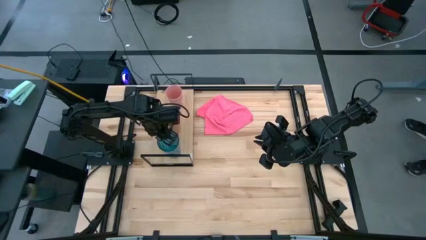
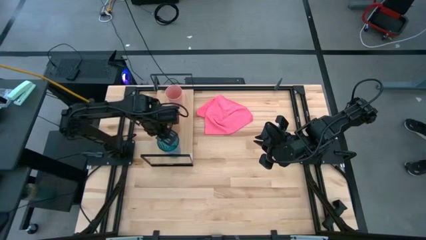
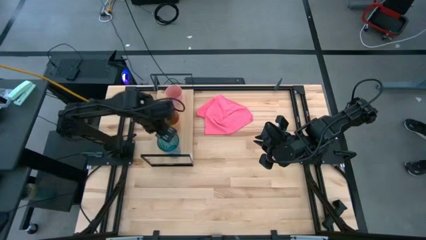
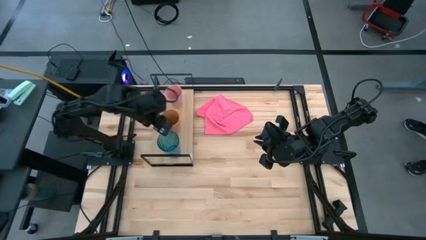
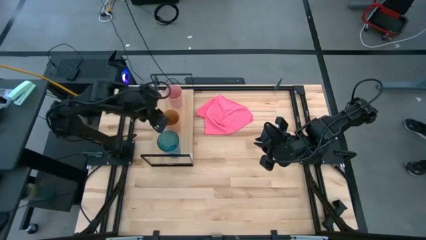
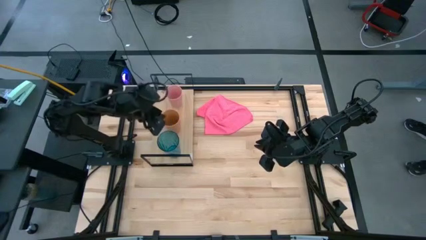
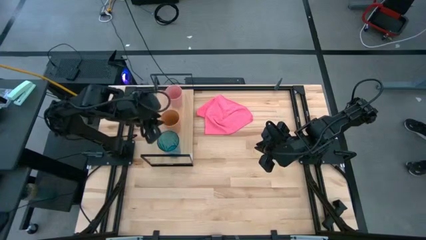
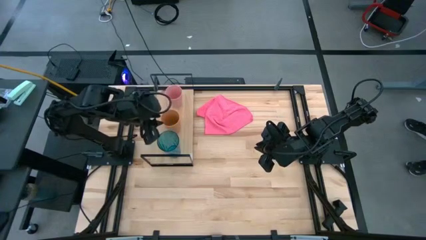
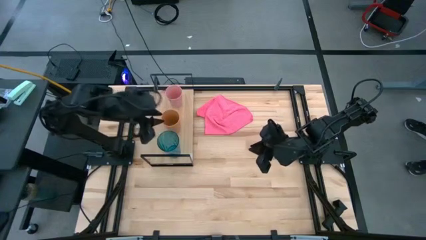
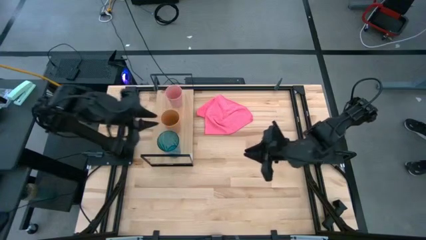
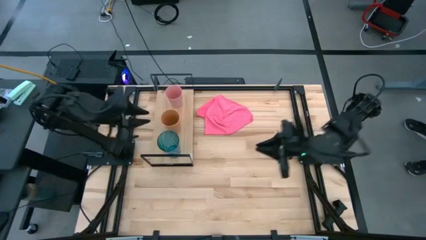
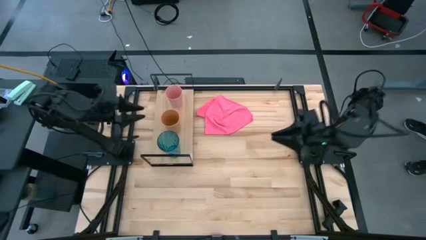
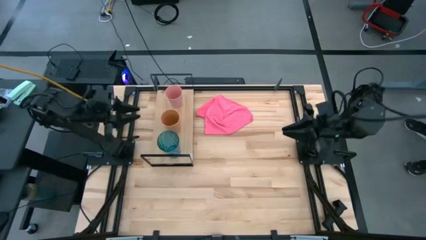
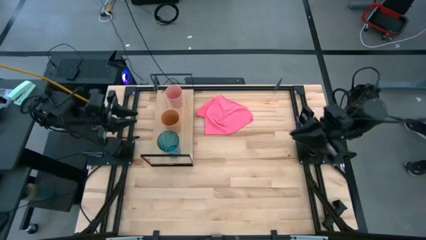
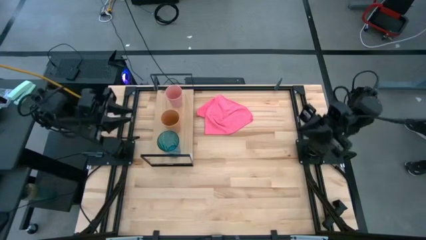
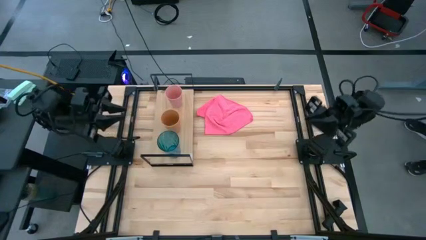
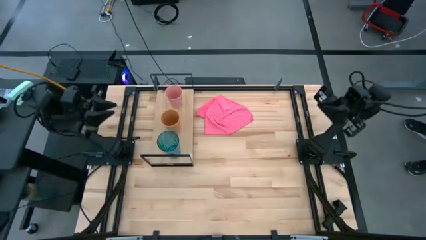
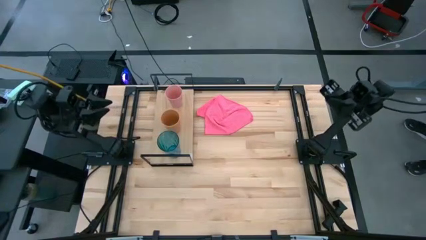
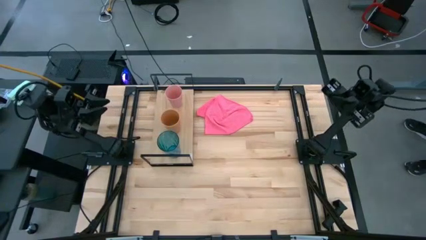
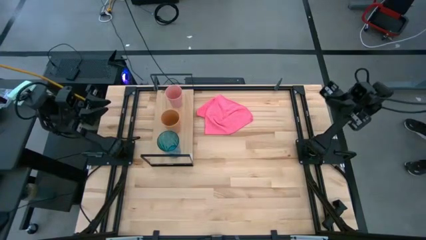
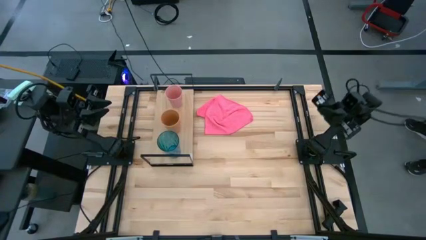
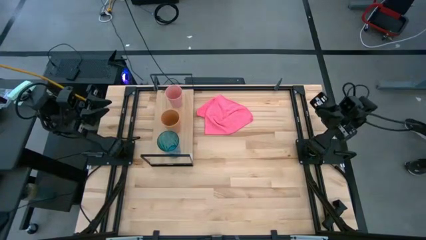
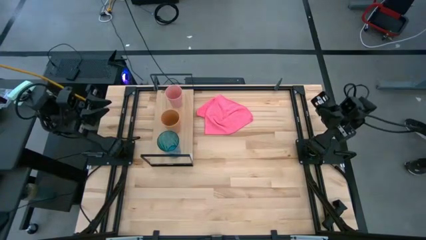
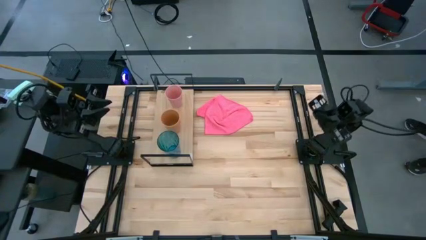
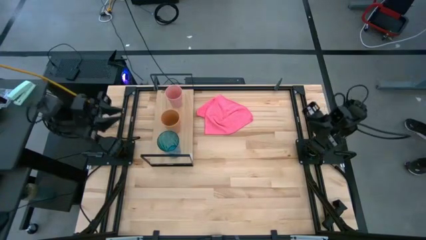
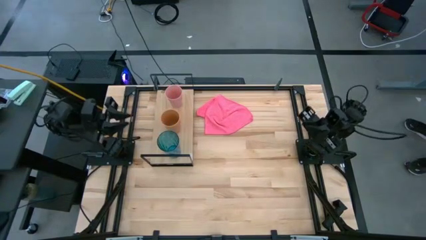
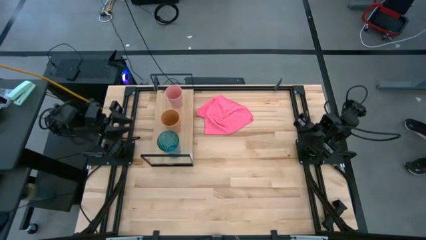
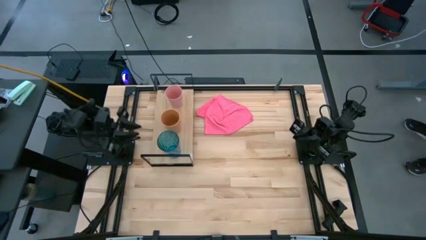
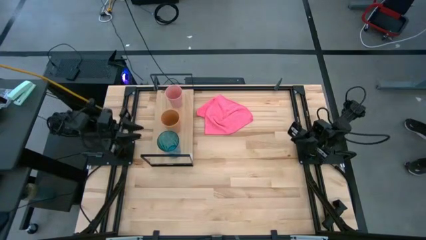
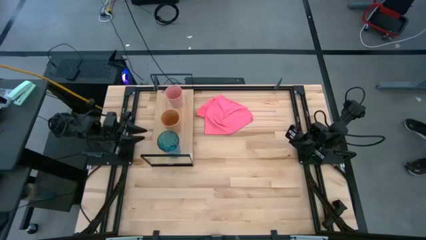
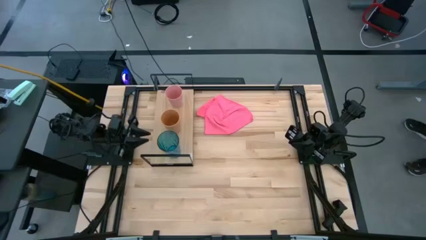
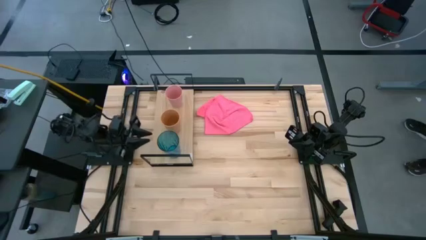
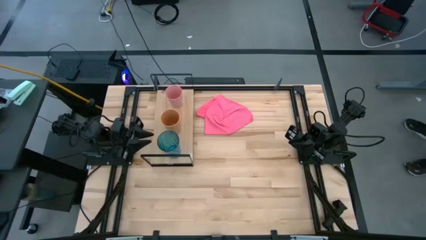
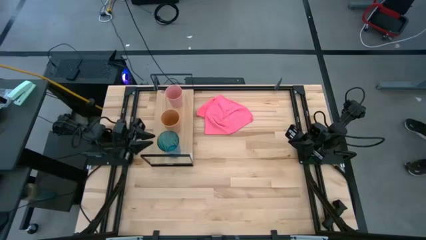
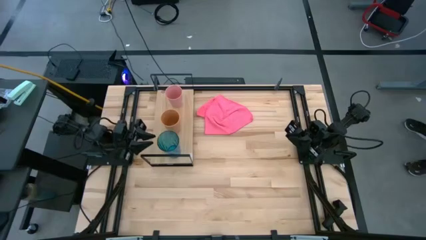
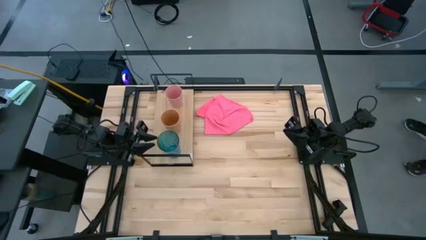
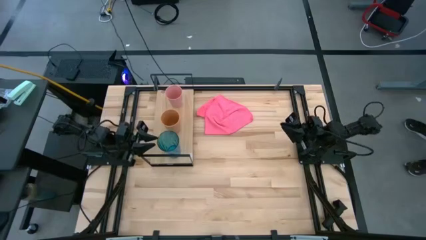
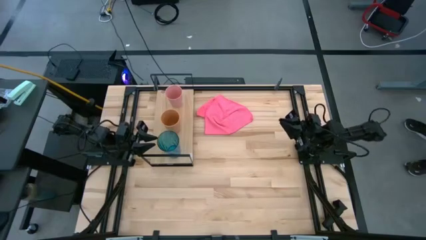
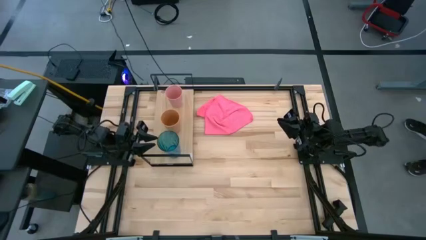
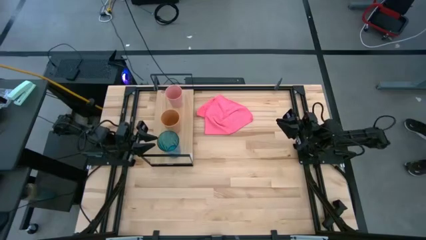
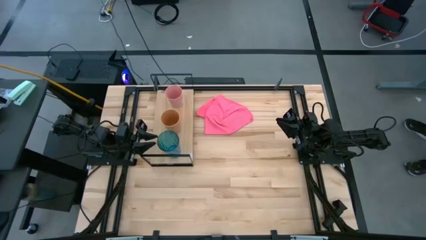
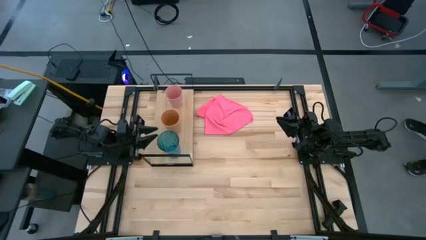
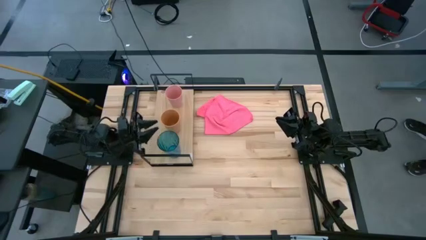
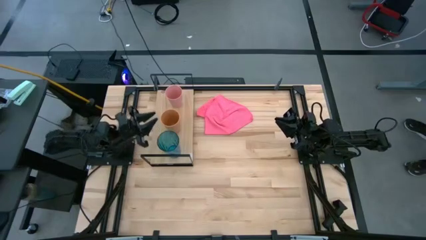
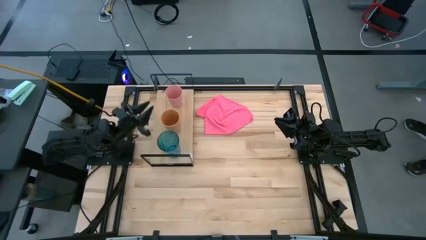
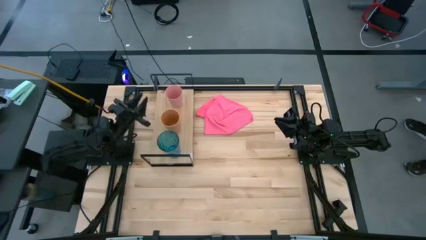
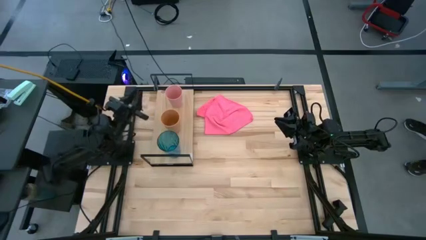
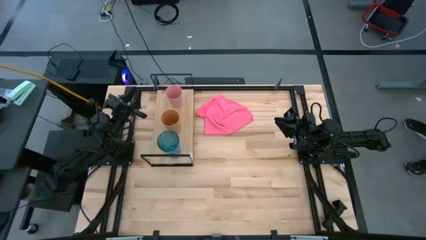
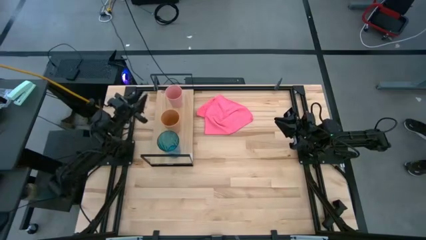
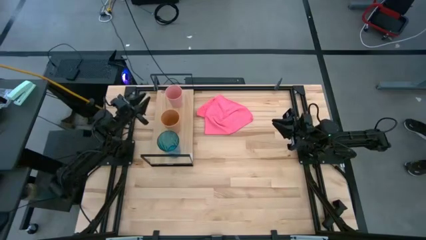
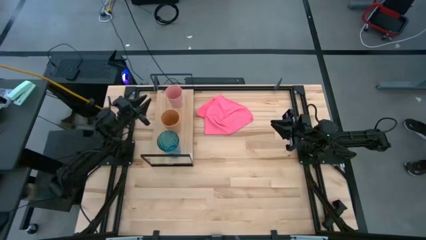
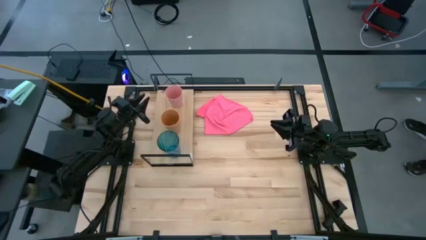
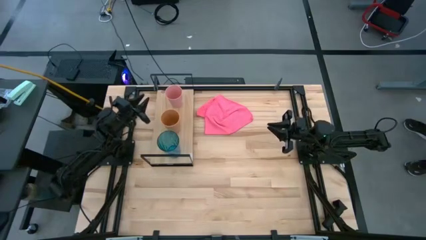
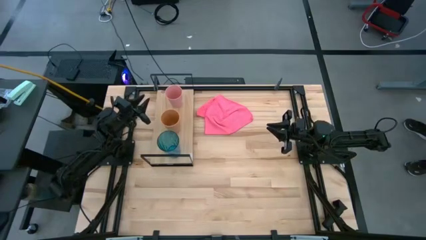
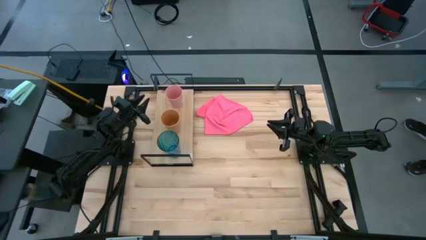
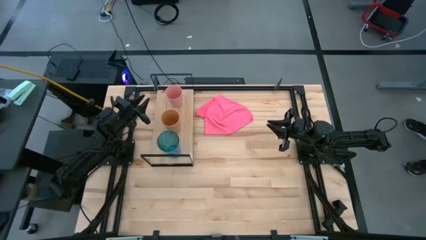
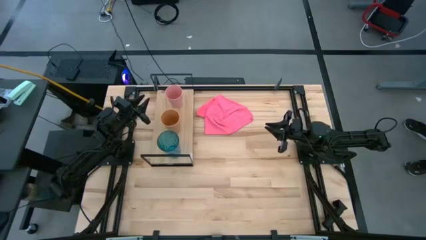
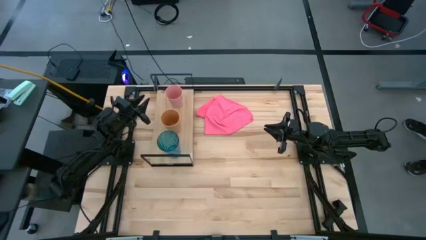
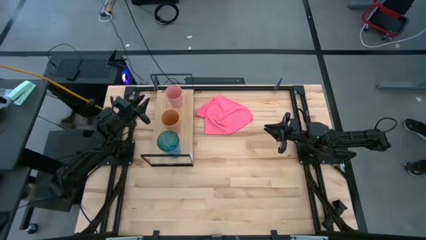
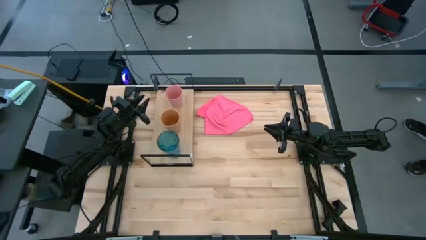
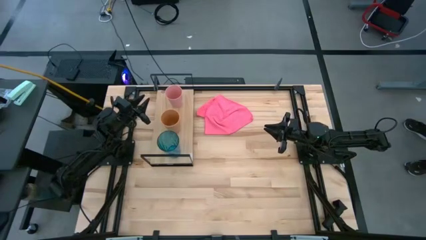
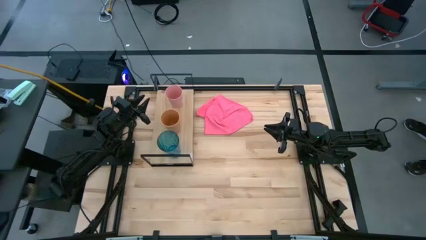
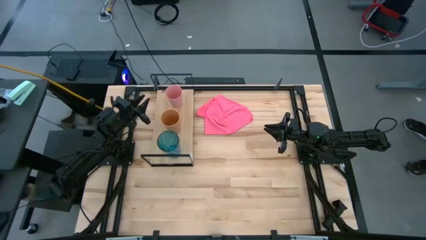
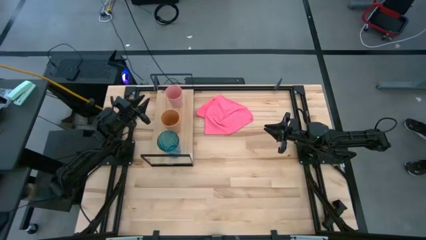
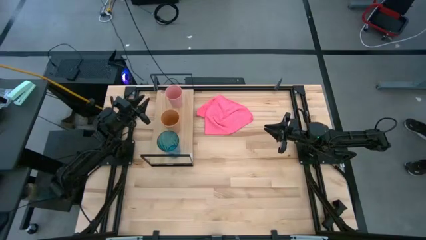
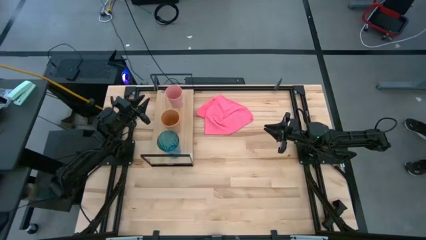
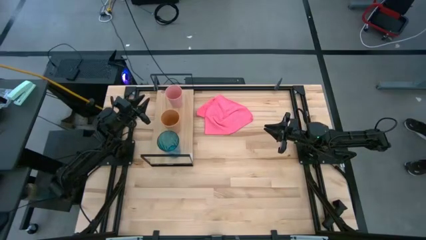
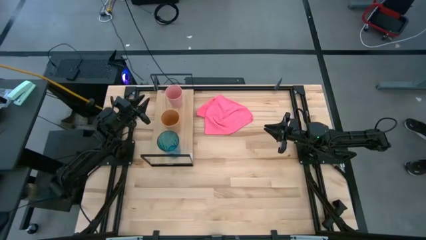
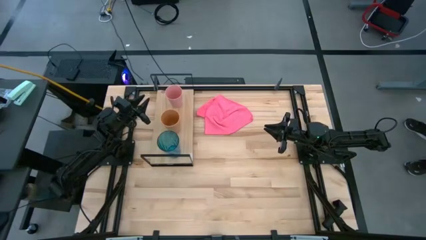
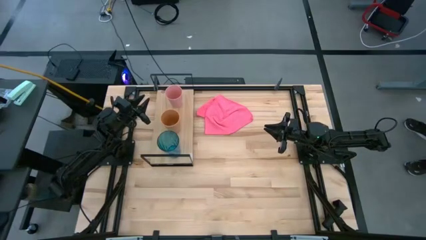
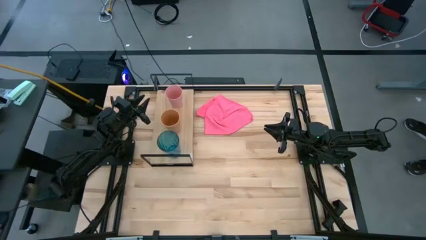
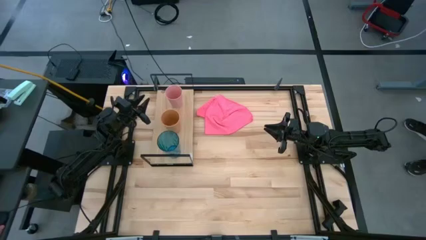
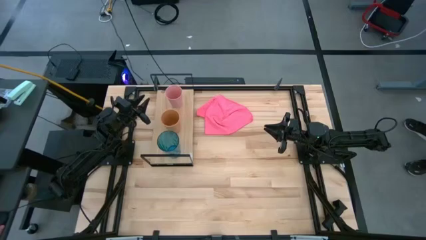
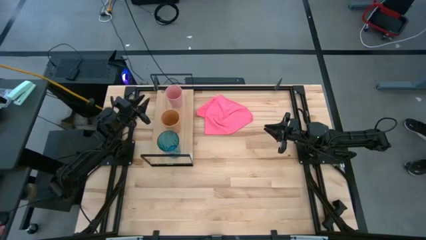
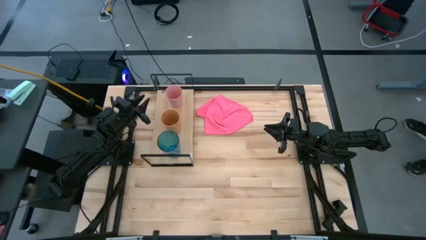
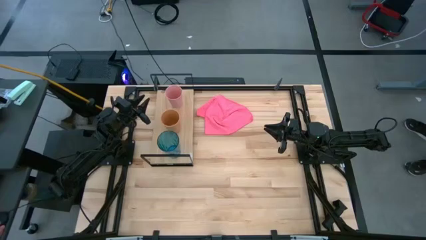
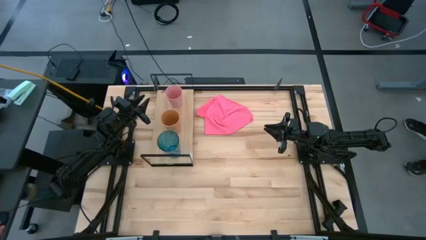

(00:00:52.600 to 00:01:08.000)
Task: Stack small to large cups/mugs on shelf
Return to Home Position
